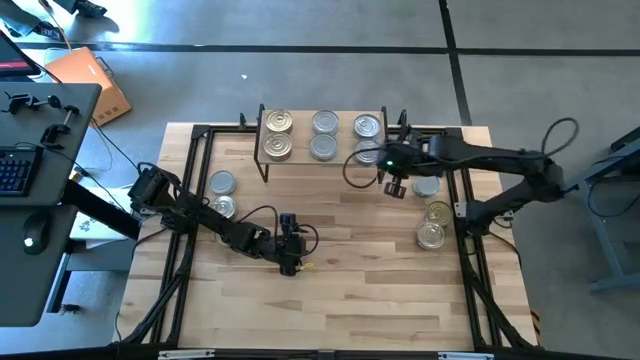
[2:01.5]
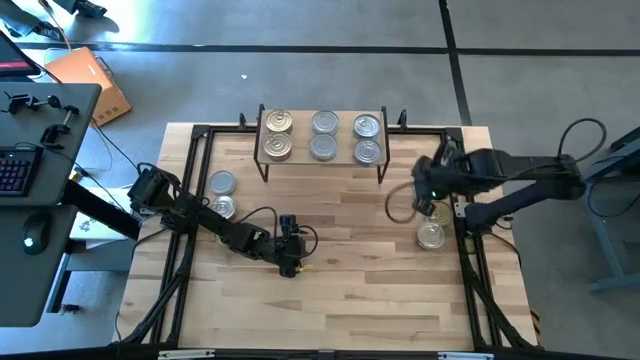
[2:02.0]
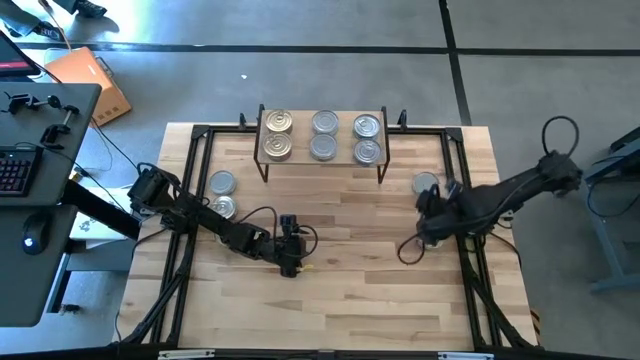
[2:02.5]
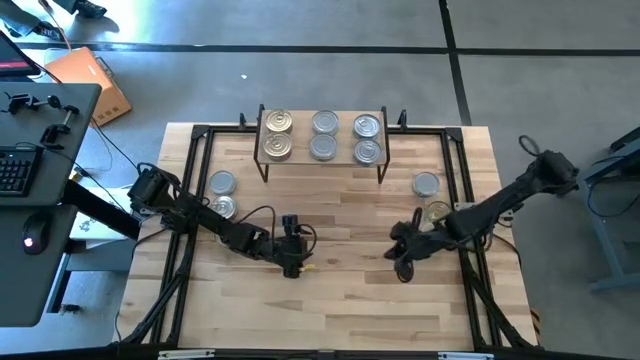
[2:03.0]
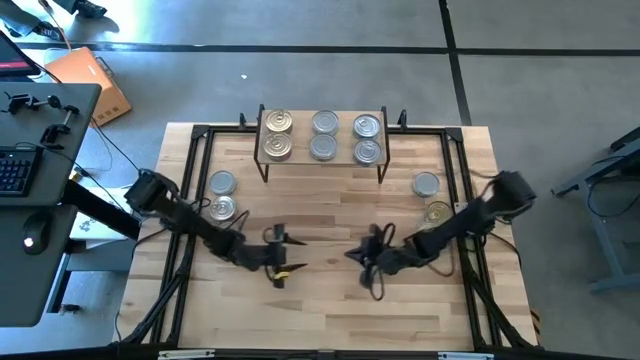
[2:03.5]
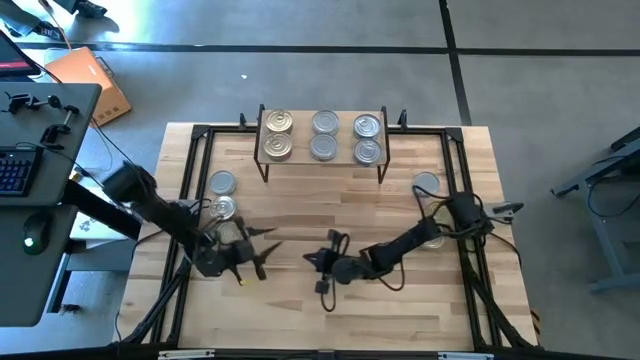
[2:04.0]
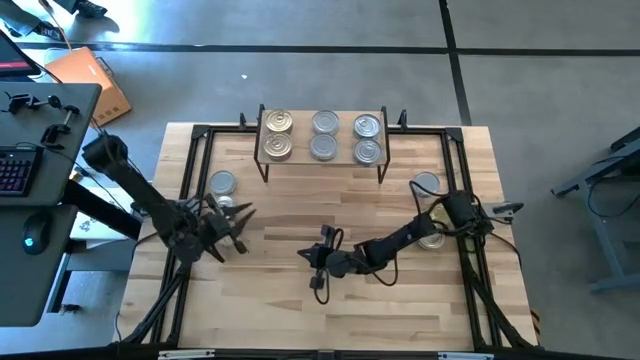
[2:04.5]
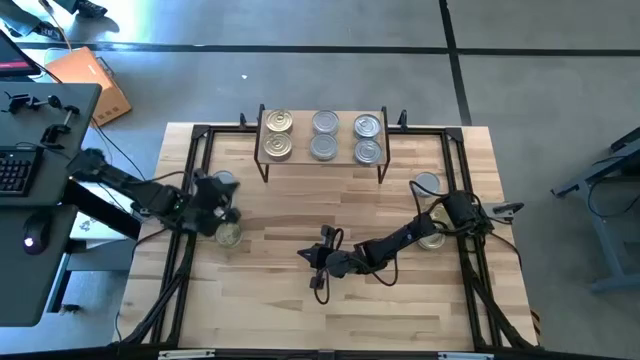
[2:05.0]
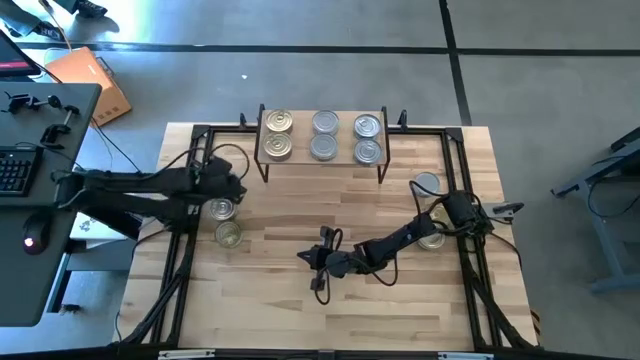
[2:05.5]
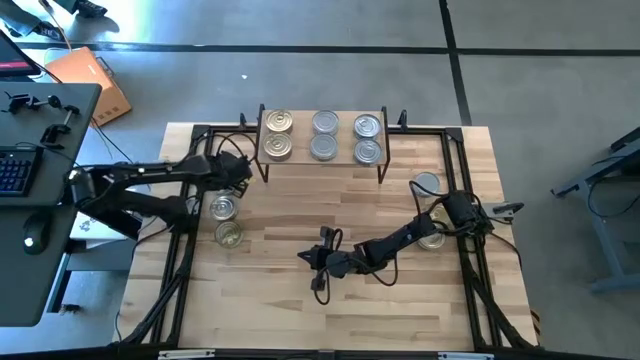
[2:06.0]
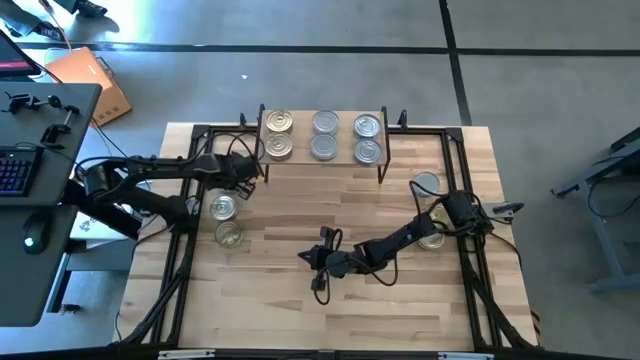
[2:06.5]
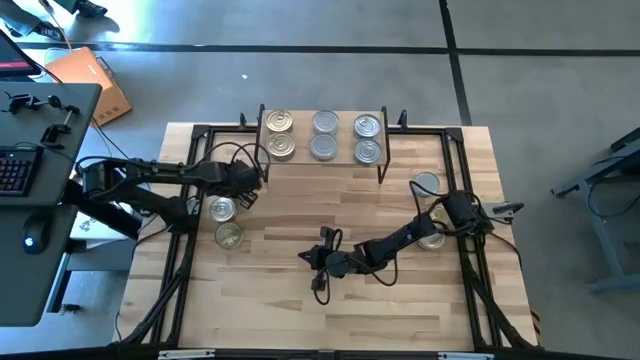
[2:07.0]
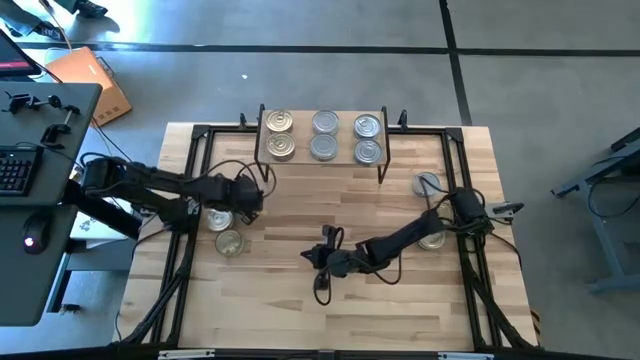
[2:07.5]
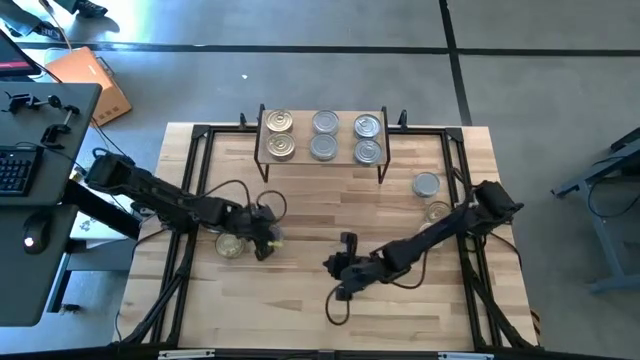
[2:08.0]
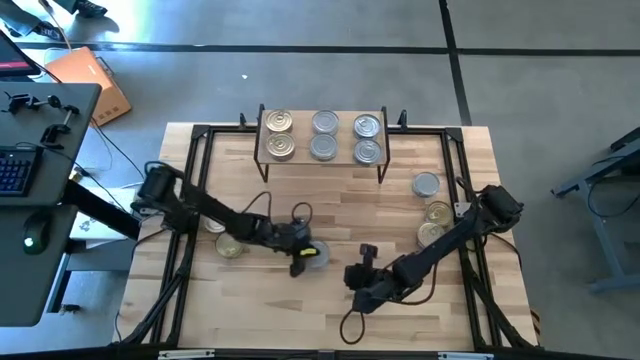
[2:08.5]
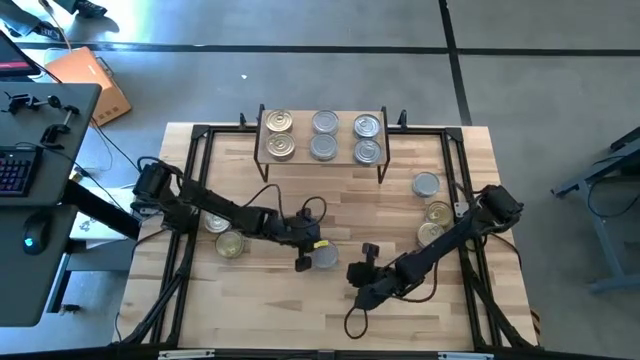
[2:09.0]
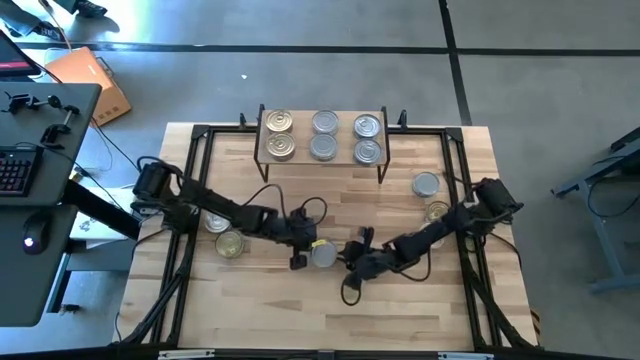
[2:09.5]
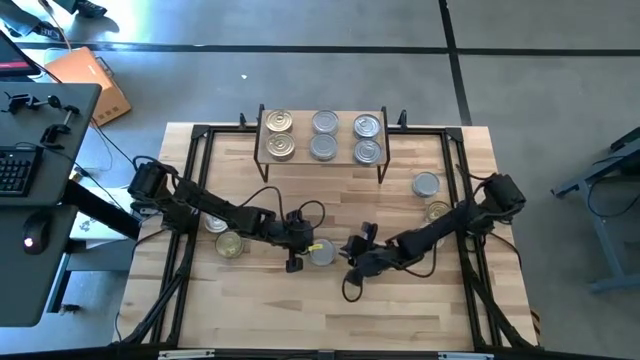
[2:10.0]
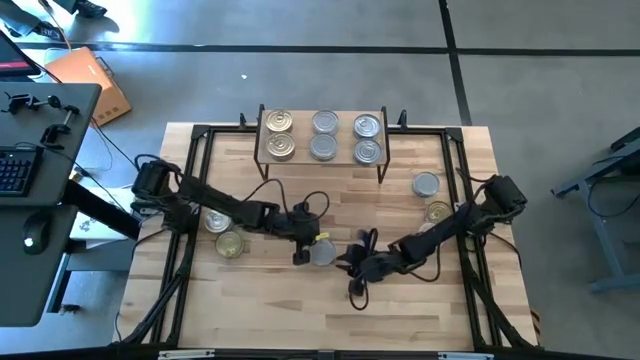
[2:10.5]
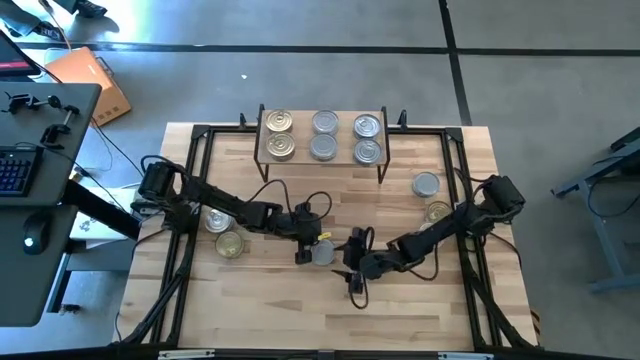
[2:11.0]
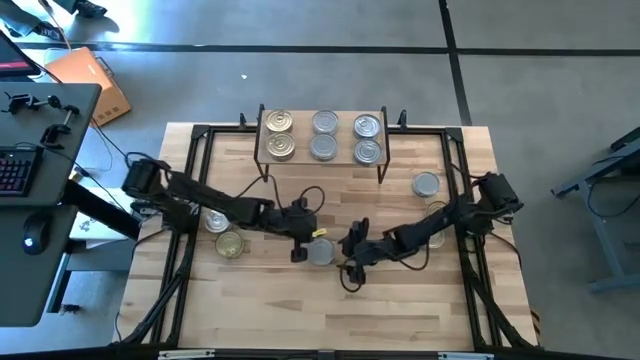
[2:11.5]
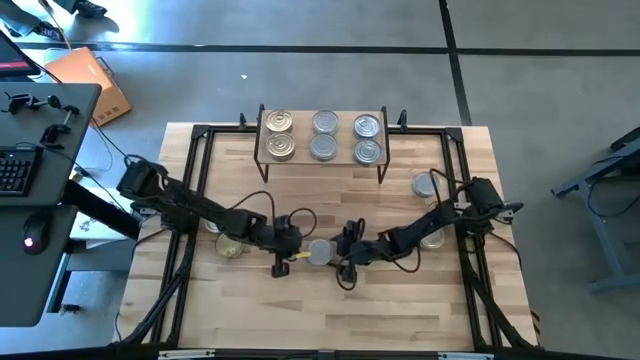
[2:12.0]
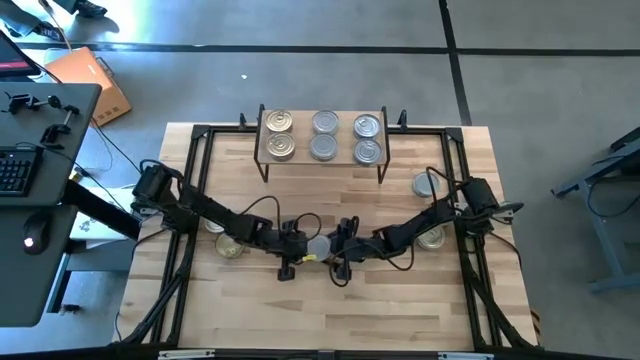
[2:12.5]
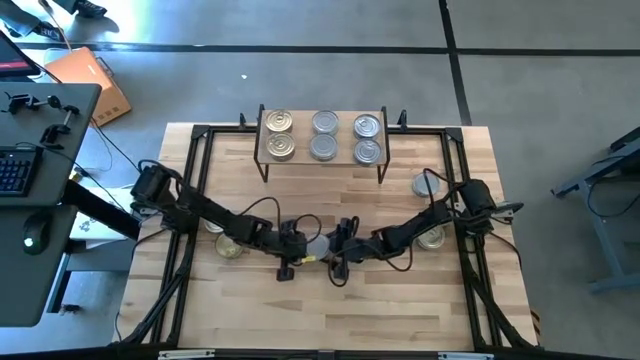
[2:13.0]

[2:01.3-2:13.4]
Task: Stack canned seafood by type on shelf
Stack the left green and white tuna can on top of the green and white tuna can on the shelf

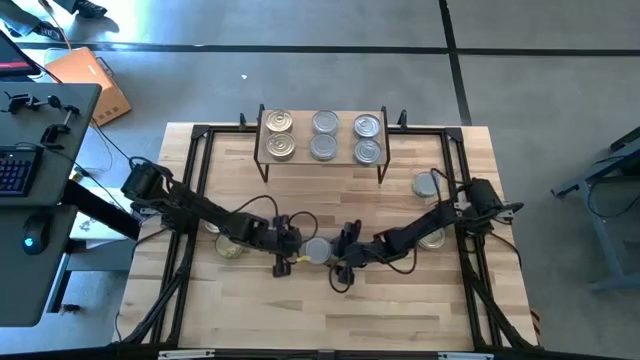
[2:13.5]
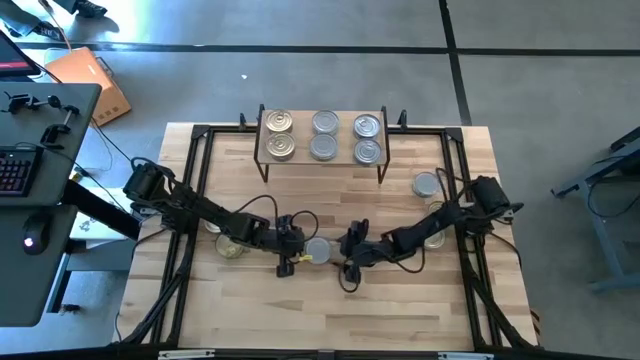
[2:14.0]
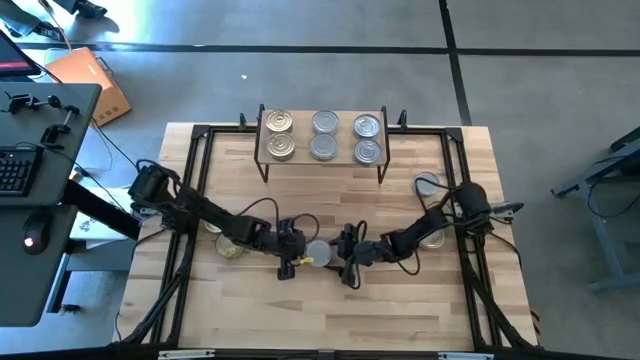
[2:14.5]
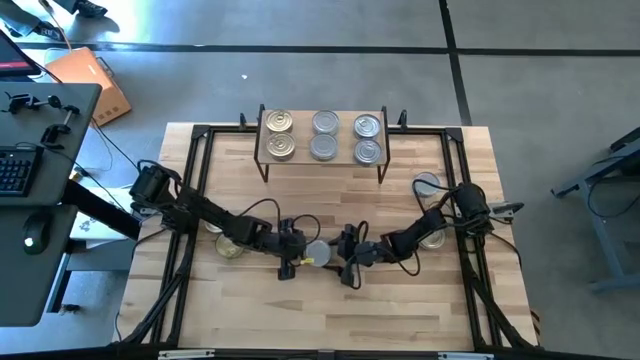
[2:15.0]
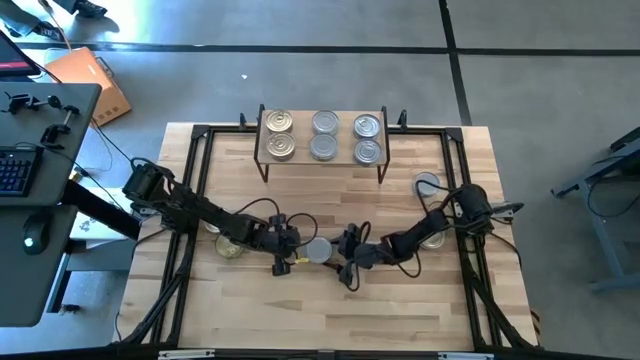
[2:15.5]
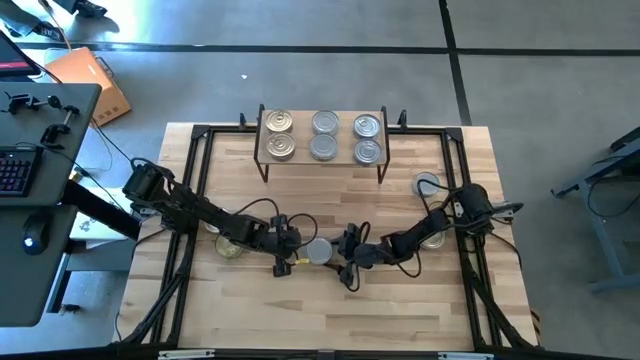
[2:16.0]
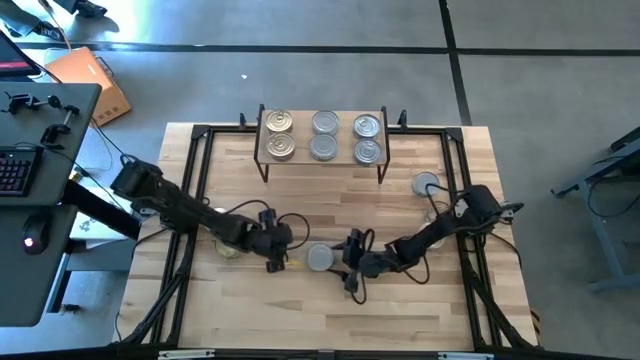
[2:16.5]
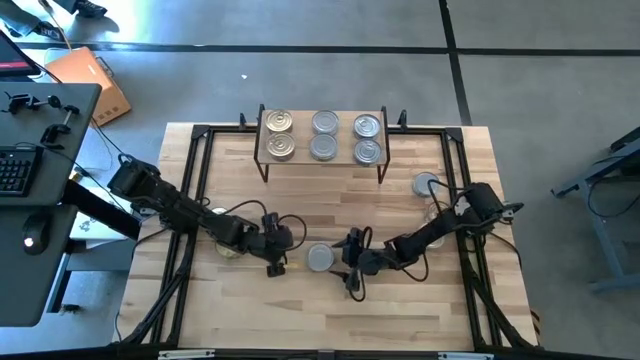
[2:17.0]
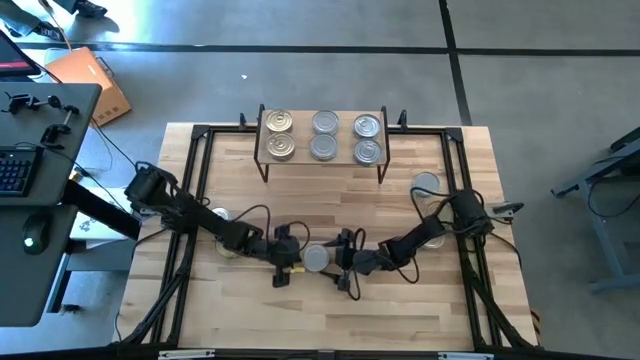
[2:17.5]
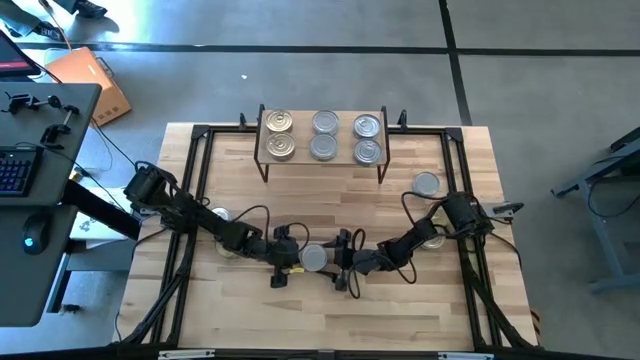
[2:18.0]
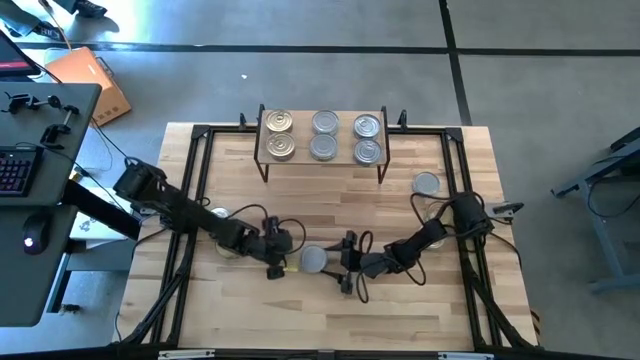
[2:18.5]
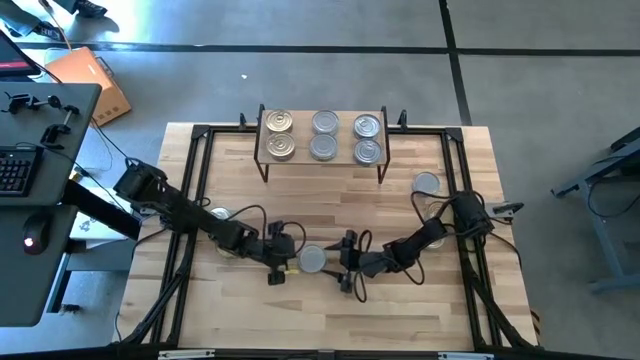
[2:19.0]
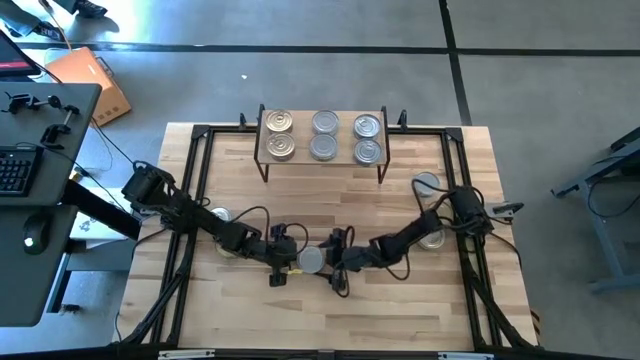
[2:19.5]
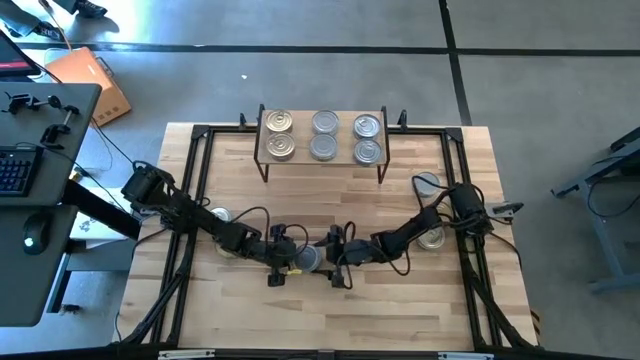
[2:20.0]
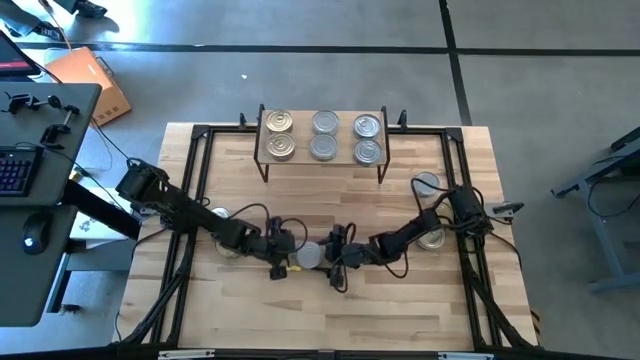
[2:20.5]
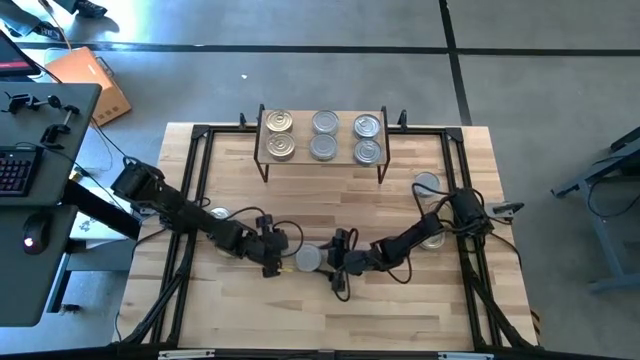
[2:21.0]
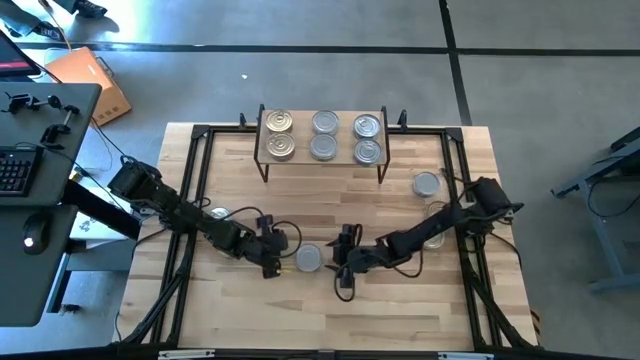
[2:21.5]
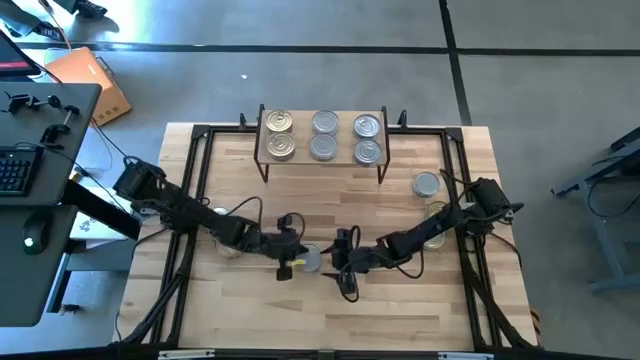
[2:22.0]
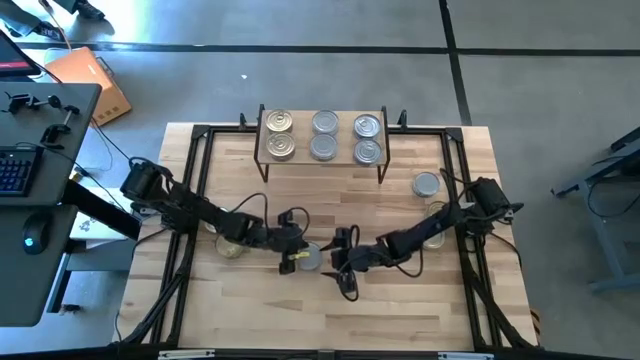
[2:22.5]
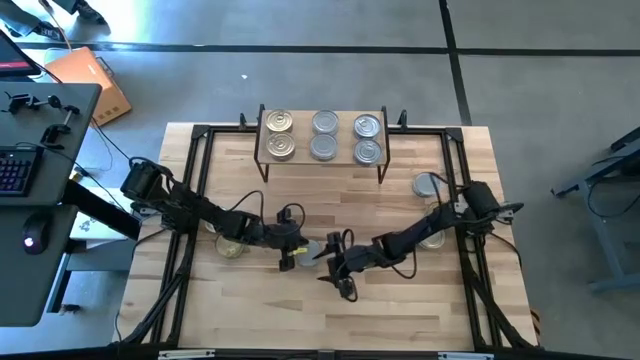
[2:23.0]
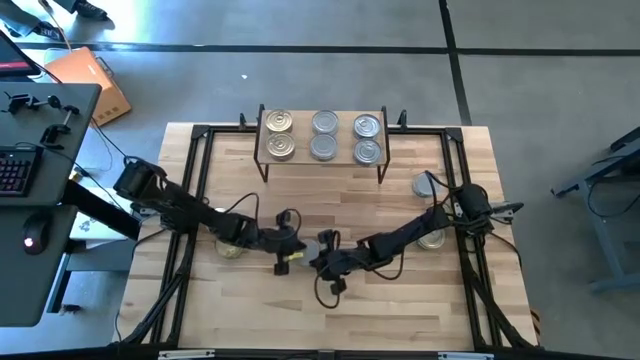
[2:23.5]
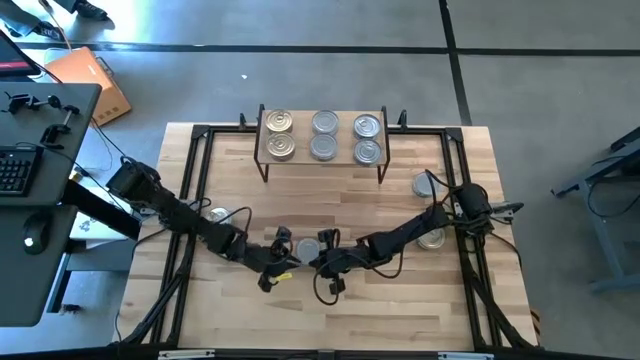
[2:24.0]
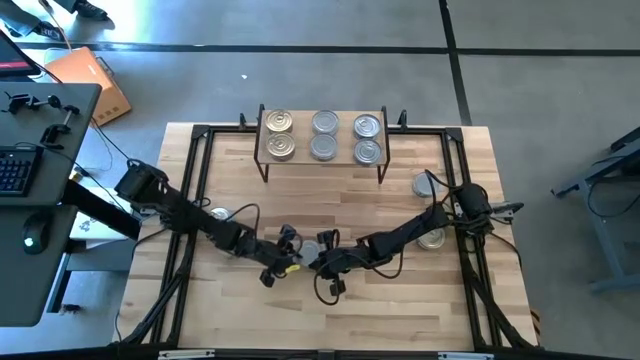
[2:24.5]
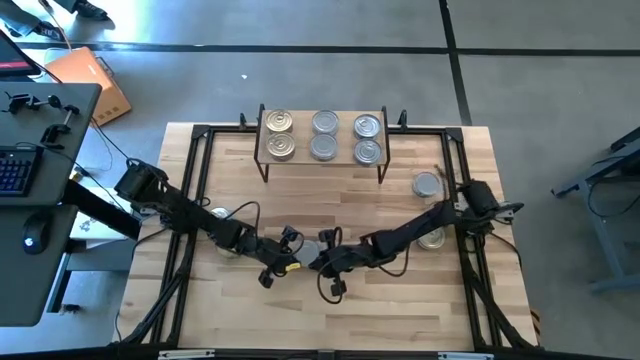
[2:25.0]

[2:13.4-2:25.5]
Stack the left green and white tuna can on top of the green and white tuna can on the shelf
